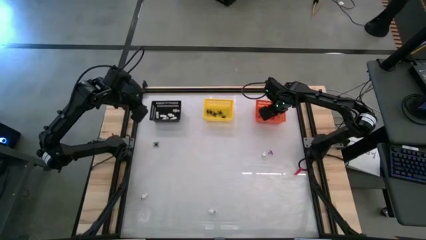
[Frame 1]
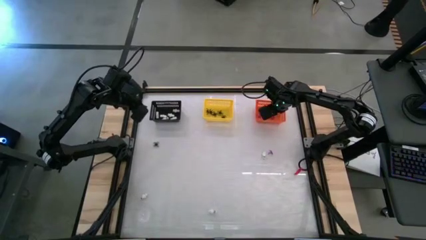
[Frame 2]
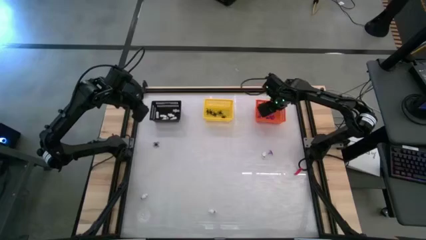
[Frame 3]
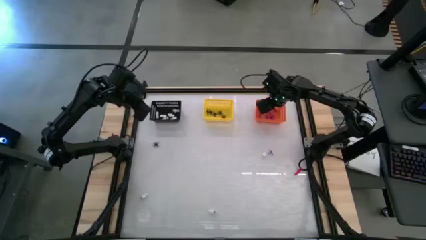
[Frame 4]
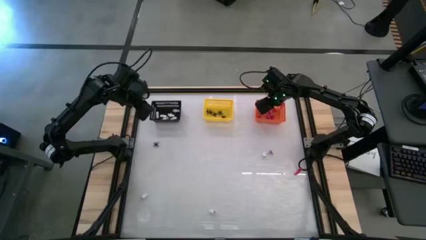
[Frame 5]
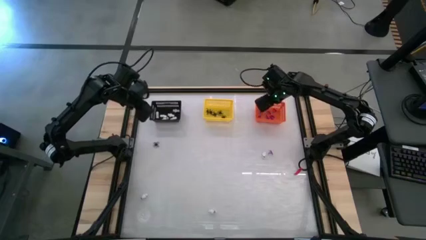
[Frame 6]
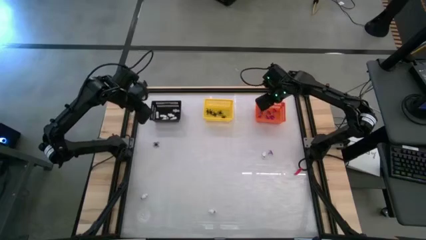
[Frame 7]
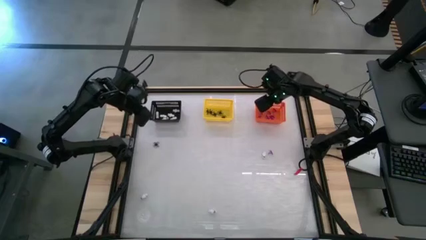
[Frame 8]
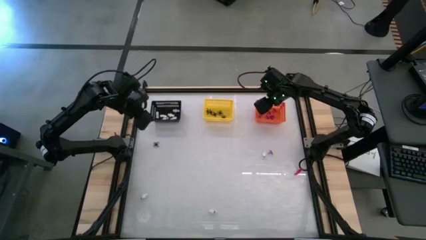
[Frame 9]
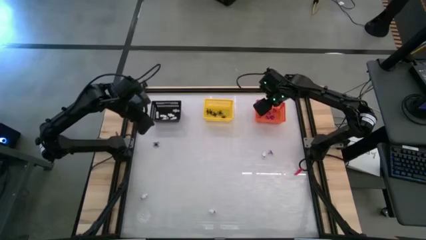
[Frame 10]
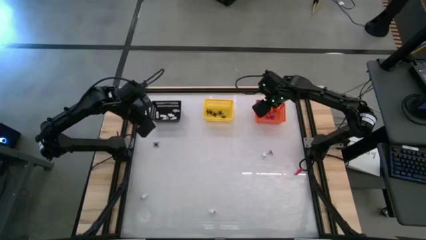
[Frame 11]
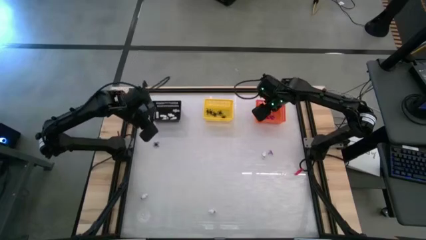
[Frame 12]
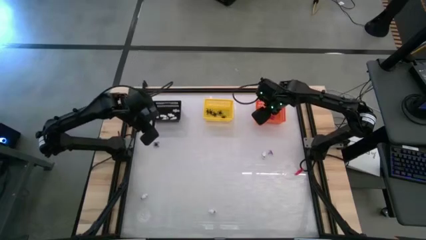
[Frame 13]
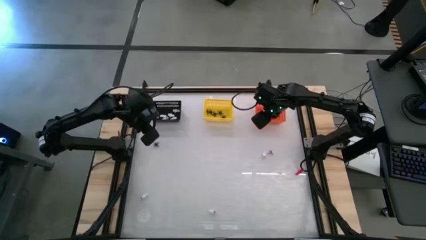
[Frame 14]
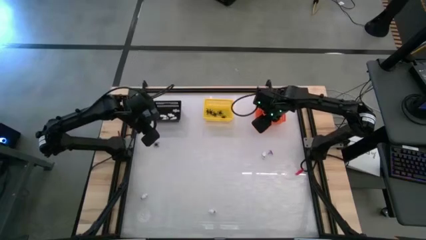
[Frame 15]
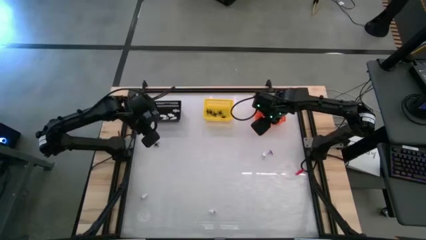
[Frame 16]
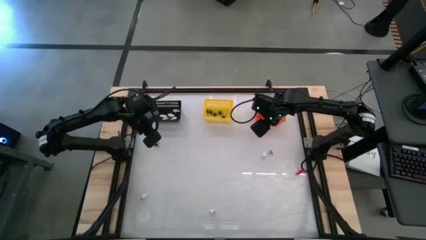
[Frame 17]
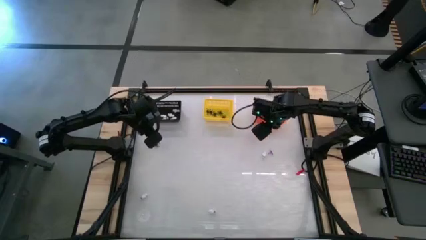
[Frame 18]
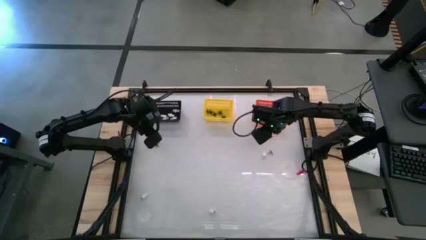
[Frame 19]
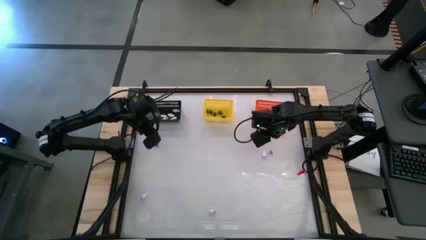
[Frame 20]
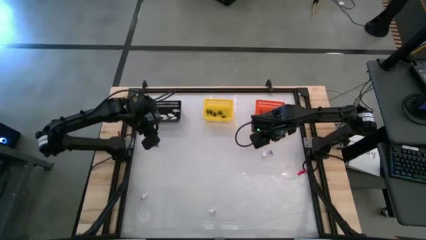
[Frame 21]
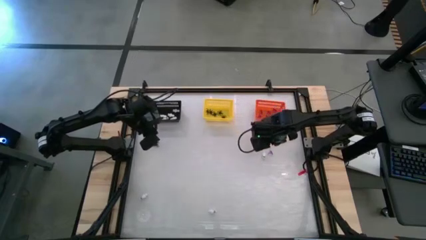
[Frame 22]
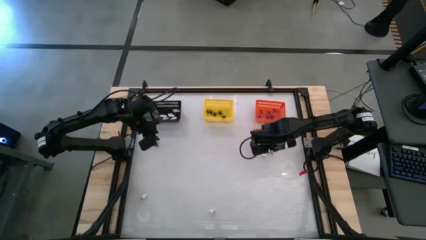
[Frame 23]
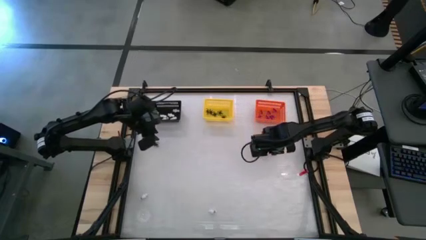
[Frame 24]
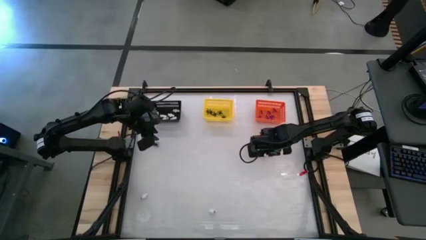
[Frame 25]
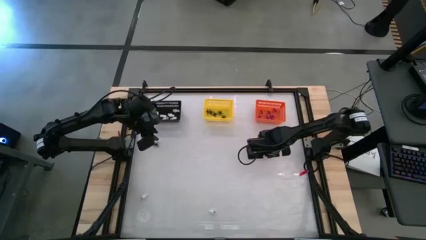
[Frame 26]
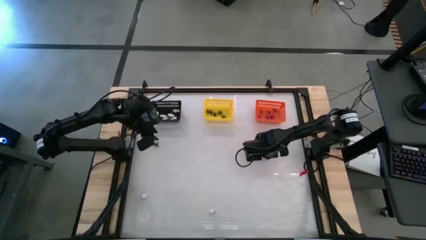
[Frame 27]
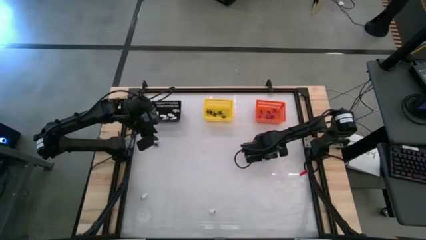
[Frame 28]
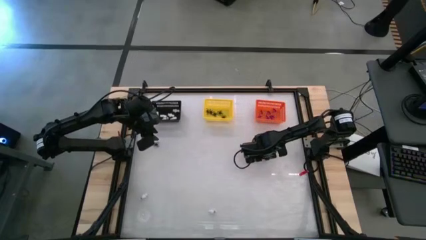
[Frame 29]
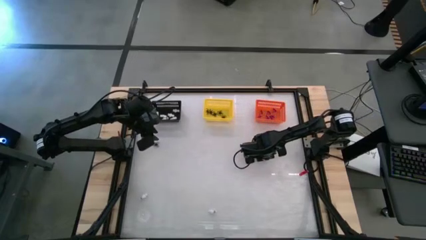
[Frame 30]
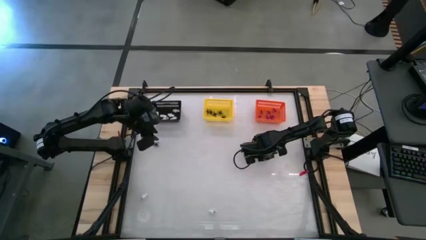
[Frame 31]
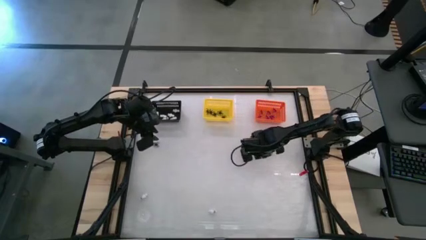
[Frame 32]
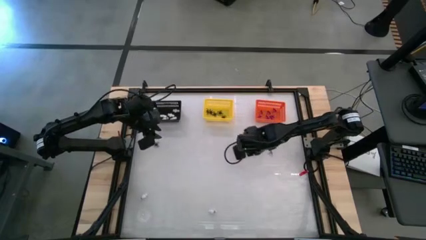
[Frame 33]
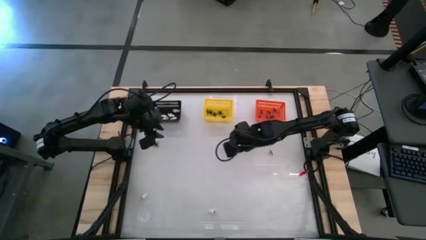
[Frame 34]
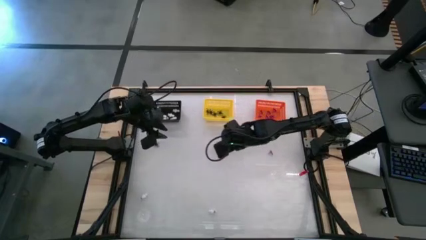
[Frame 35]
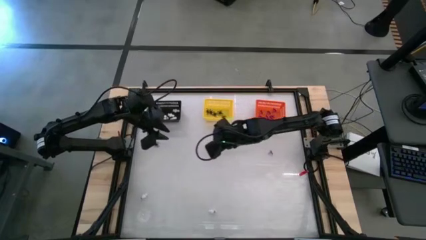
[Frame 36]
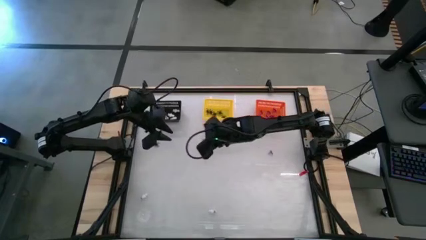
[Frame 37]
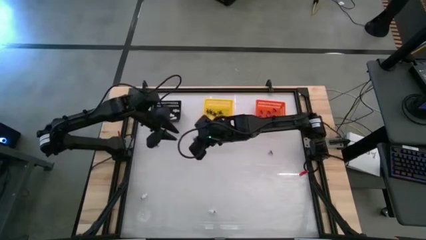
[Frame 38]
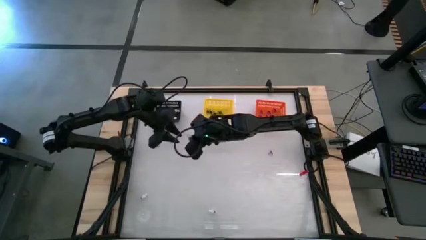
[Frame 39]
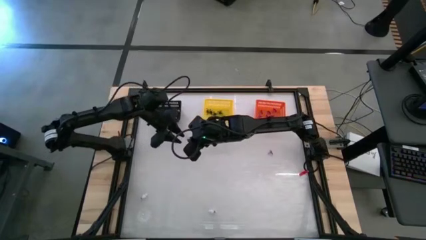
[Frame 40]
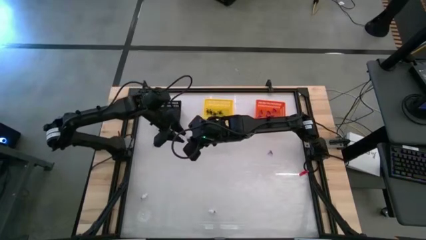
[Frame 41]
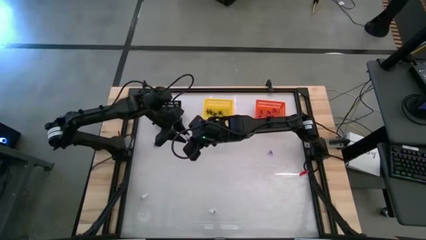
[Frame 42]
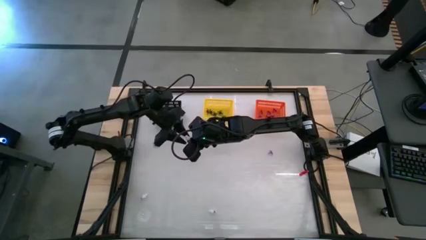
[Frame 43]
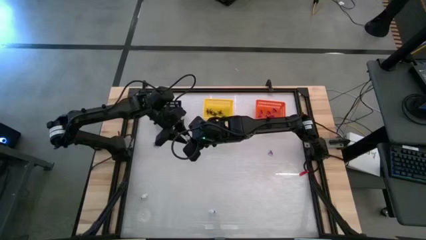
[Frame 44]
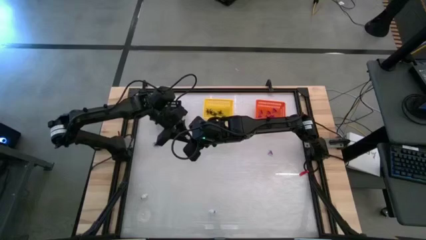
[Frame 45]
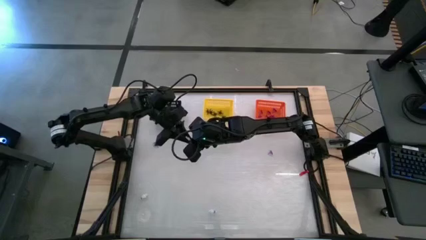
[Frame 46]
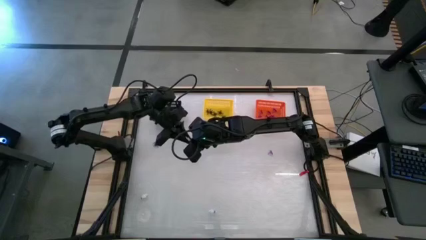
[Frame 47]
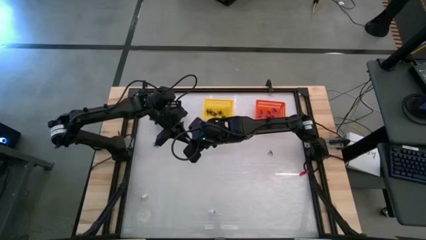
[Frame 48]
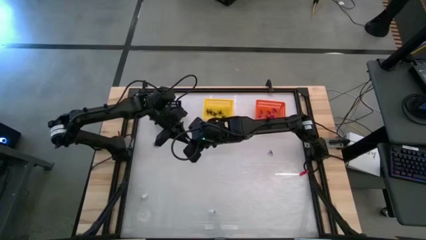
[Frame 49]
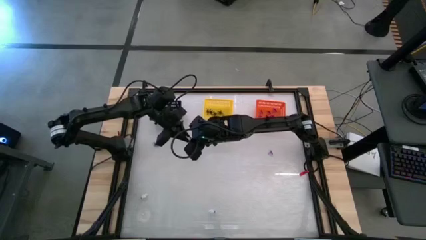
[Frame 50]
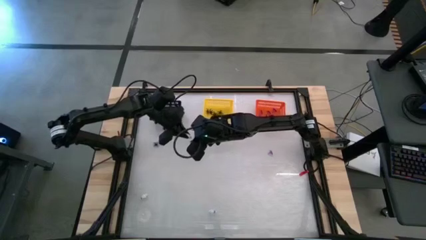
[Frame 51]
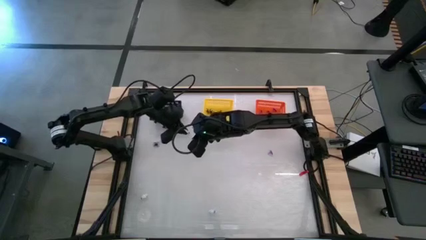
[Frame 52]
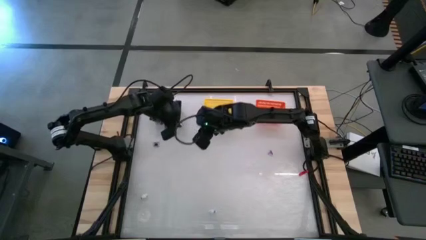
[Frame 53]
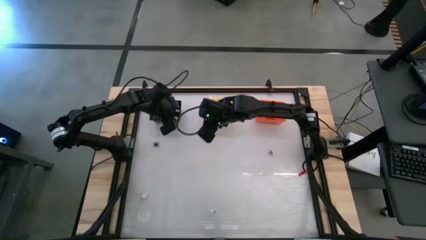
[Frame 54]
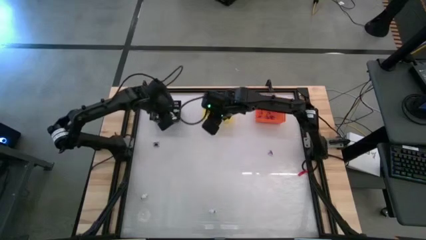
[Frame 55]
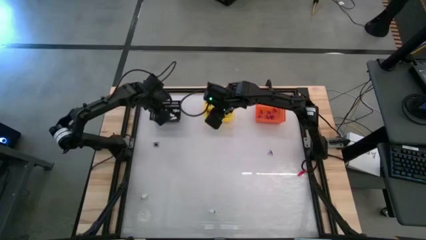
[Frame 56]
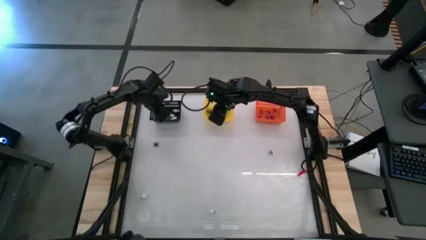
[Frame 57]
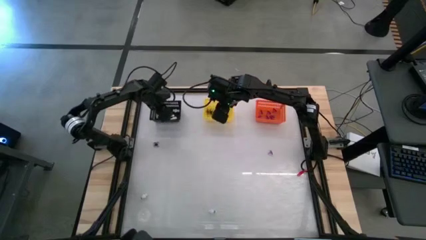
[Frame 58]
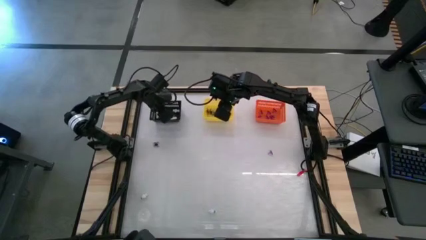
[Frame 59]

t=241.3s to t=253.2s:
Task: Sort Halloween decoration
Put the white skeleton toy into the black basket

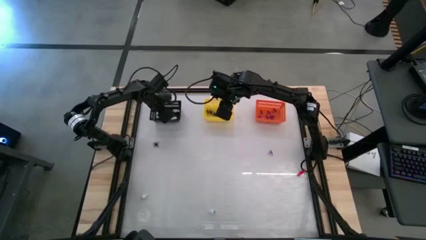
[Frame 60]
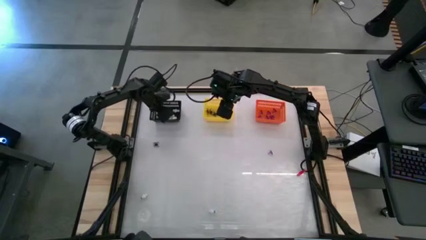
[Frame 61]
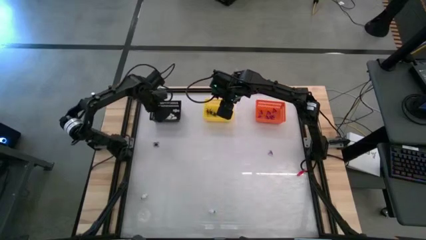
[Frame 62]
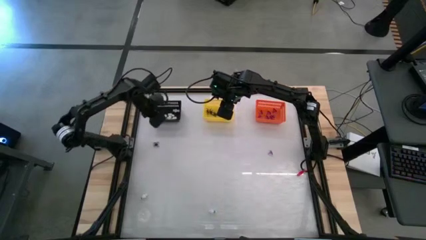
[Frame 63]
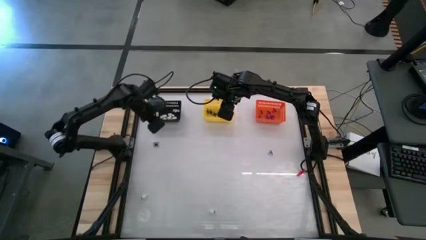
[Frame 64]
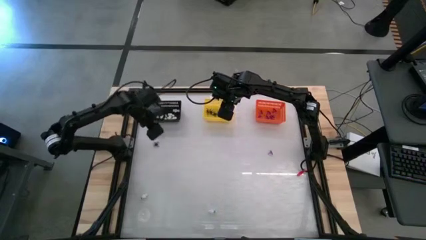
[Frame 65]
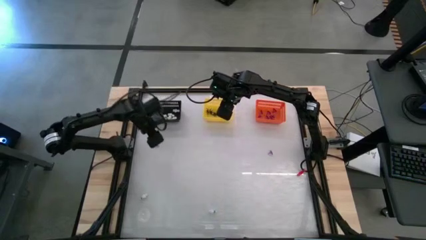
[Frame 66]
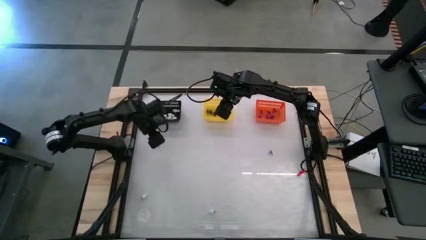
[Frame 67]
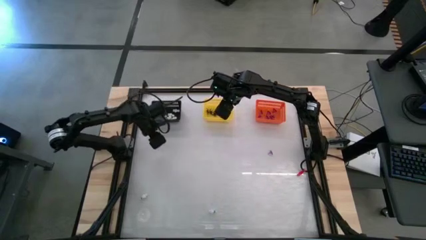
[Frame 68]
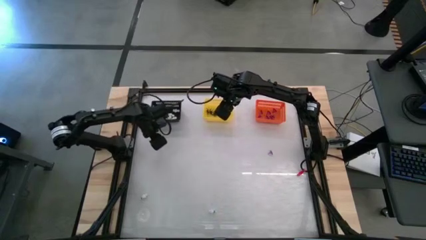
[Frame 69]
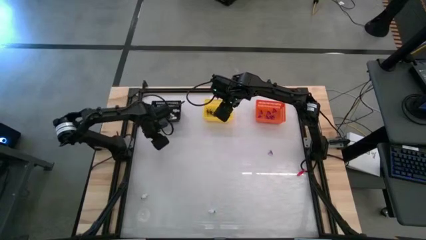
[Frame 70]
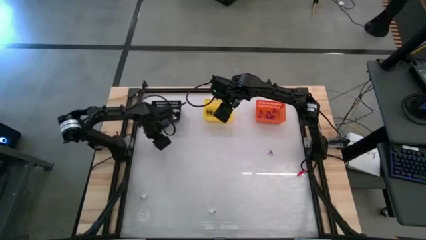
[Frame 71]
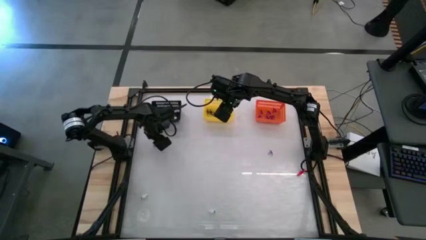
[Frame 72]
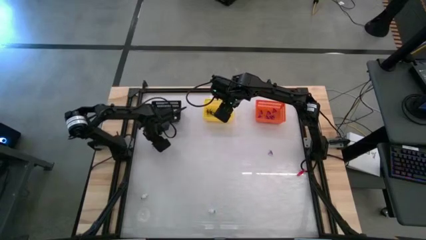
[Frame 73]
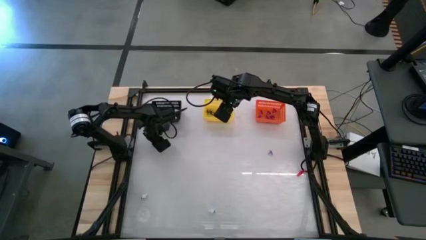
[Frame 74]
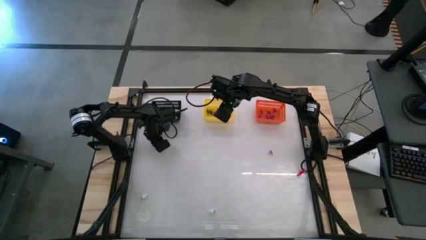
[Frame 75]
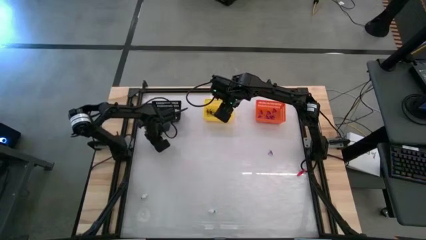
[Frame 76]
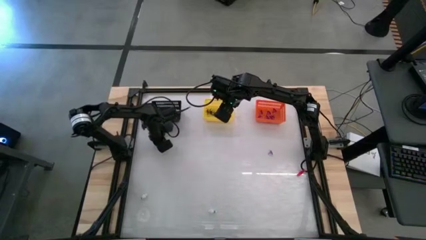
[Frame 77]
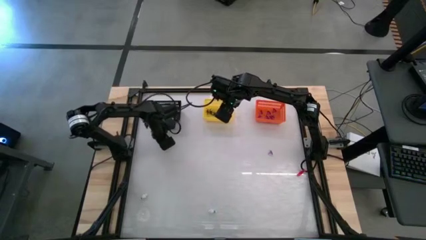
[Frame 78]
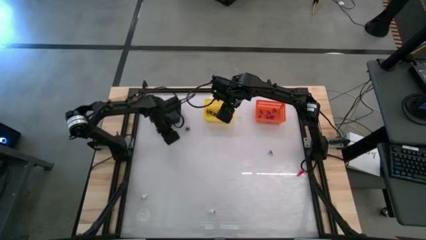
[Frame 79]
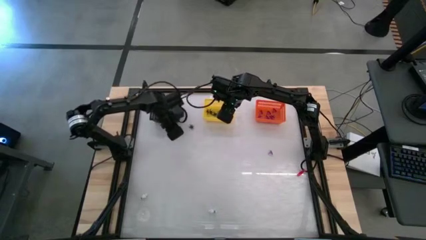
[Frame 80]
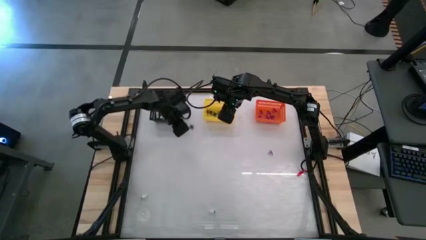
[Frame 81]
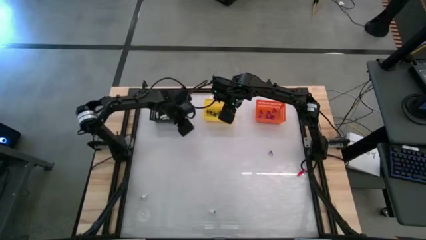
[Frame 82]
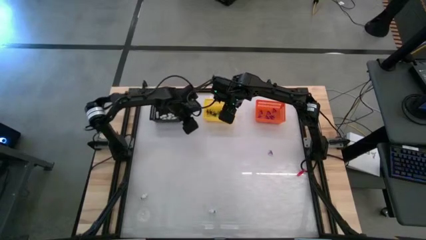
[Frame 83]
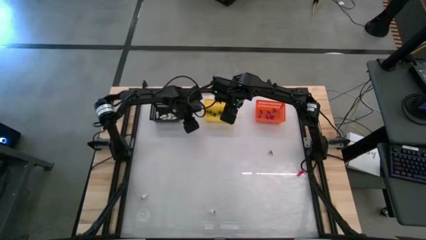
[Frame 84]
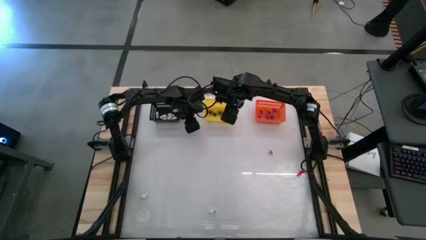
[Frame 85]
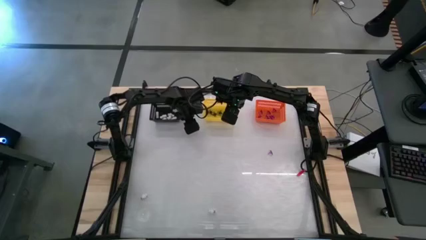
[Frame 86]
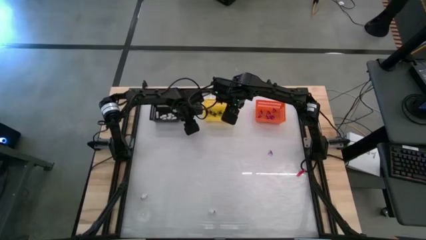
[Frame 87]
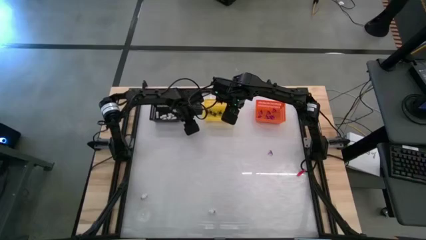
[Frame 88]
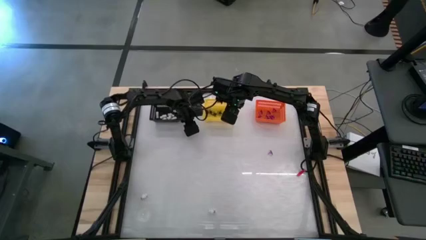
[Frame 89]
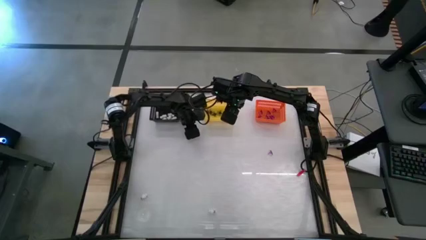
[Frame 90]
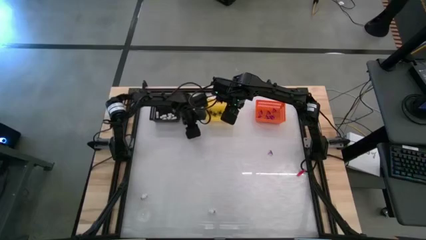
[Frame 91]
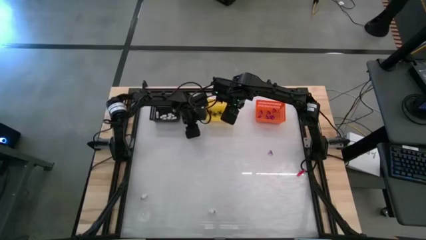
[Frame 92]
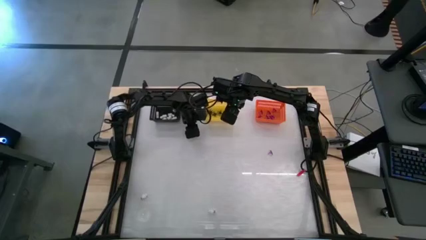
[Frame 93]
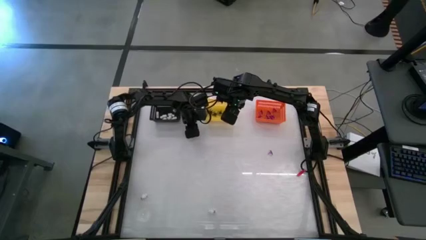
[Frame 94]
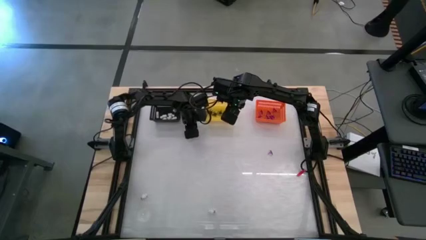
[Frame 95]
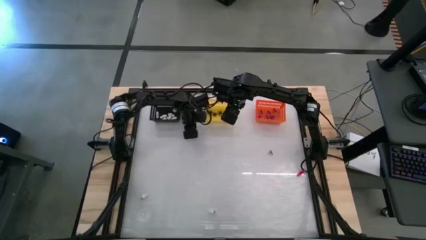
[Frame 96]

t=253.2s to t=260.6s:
Put the black spider toy into the yellow basket
